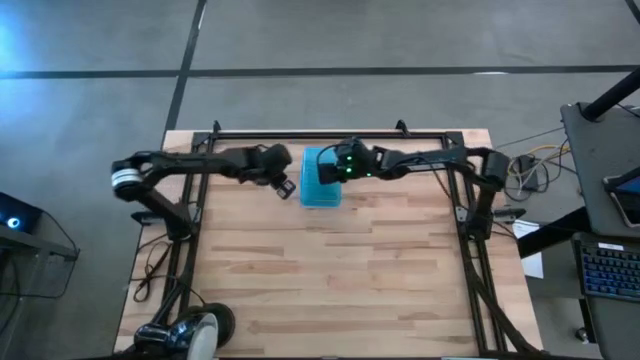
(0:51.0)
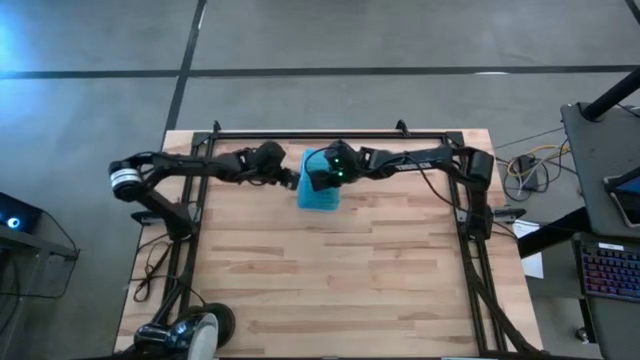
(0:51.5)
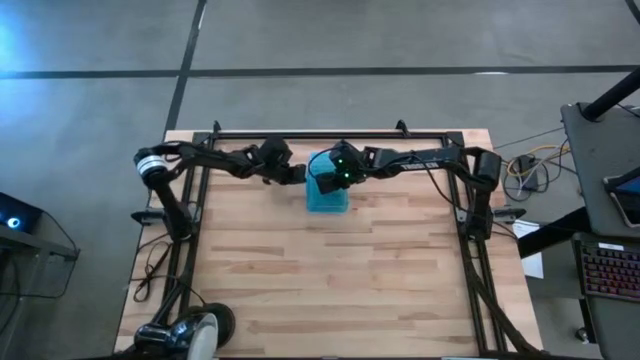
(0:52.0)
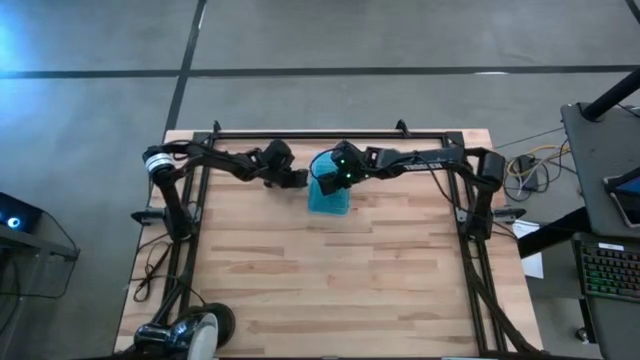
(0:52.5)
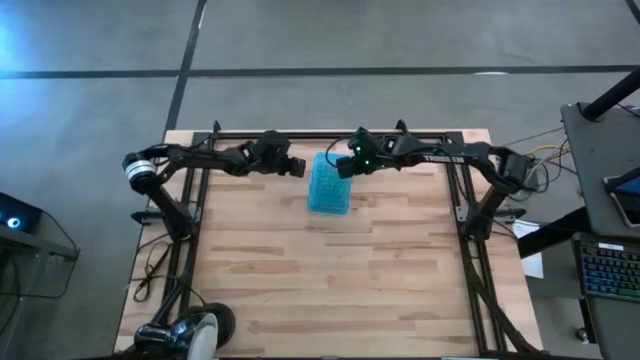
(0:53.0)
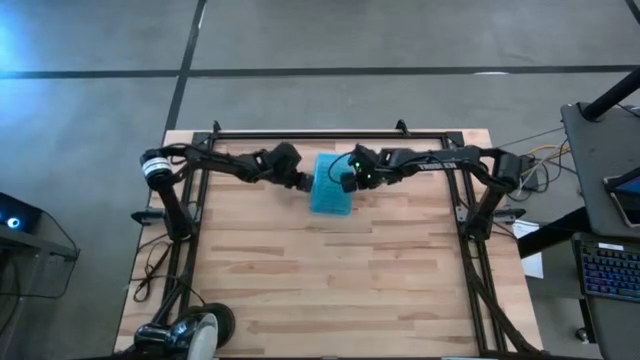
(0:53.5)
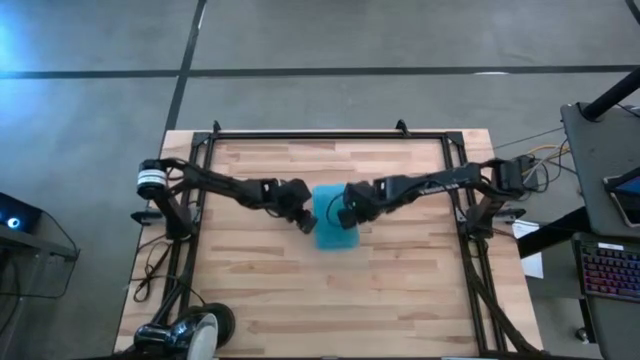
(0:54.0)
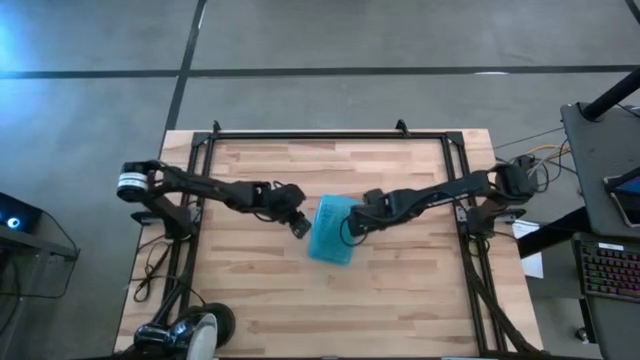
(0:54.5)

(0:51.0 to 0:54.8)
Task: Pick & place school supplies into a supply box
Move the supply box to the center of the table

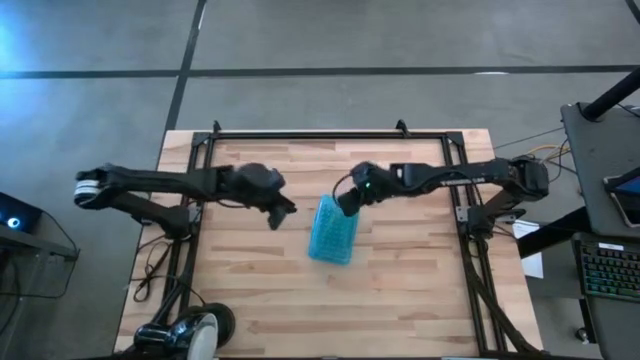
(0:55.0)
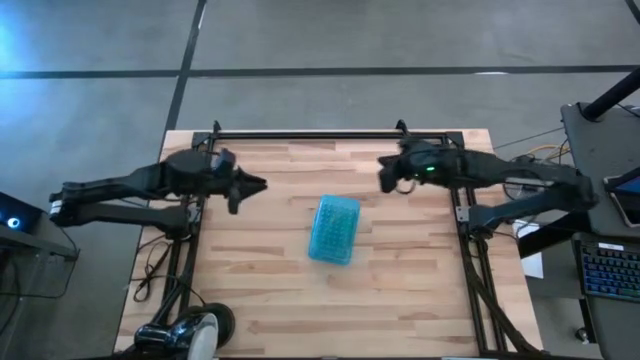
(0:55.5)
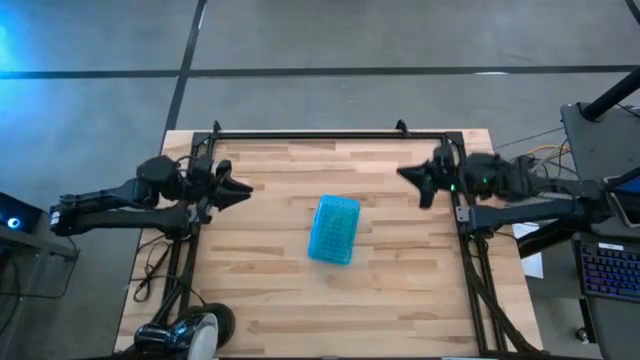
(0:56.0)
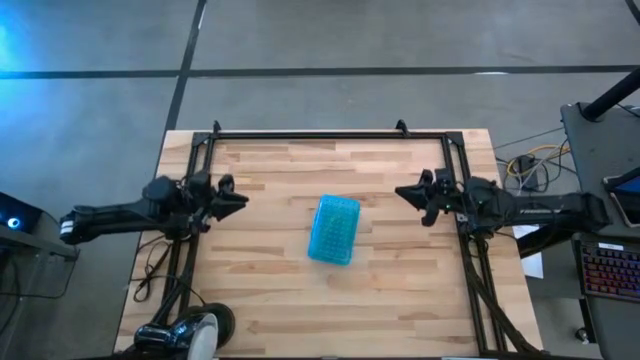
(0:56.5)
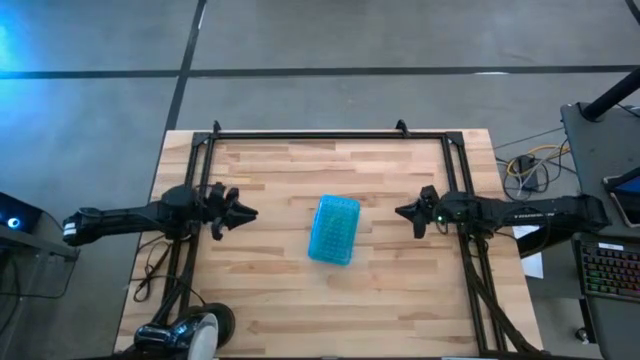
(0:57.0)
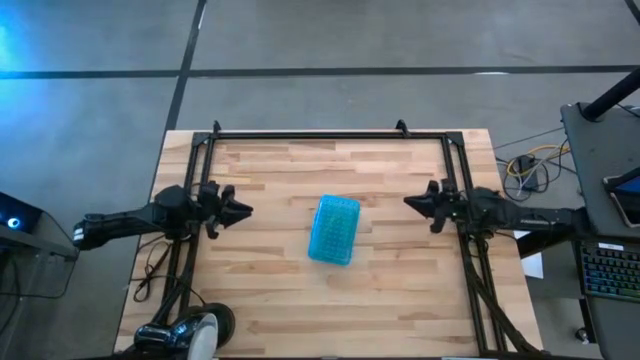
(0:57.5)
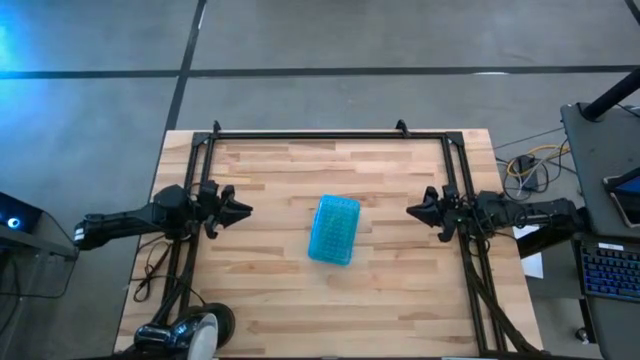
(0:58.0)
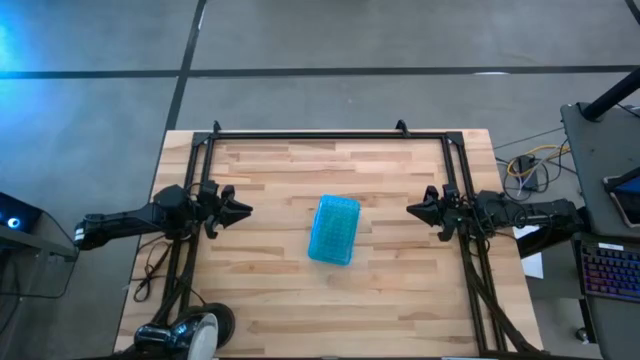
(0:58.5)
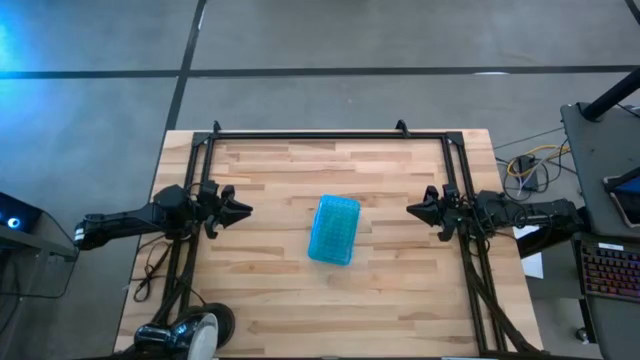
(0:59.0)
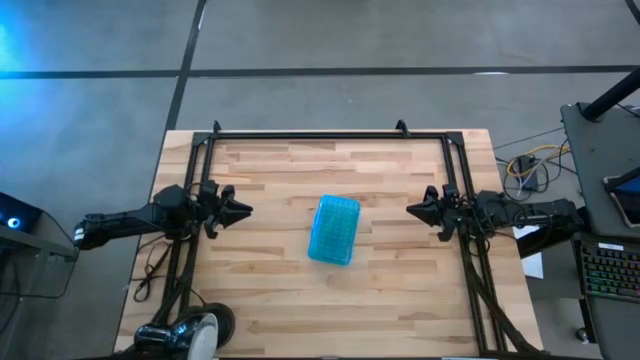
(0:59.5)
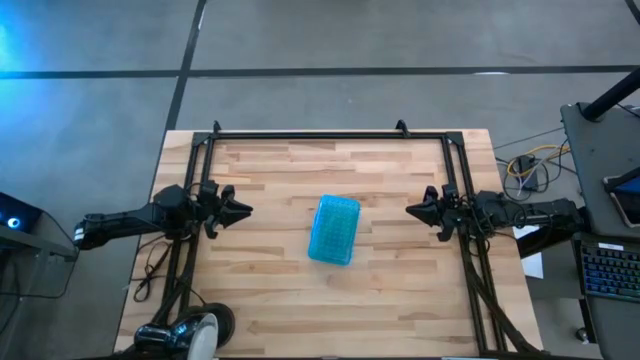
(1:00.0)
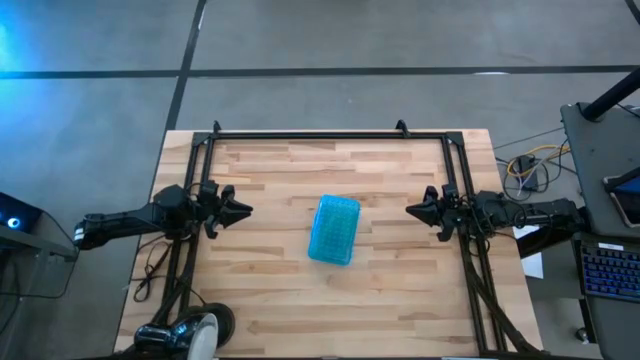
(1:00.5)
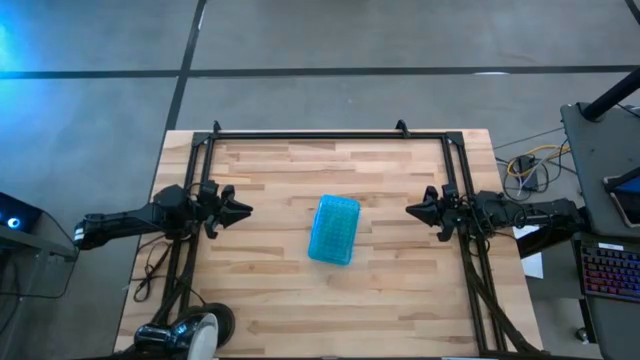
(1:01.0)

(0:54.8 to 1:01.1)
Return to Home Position

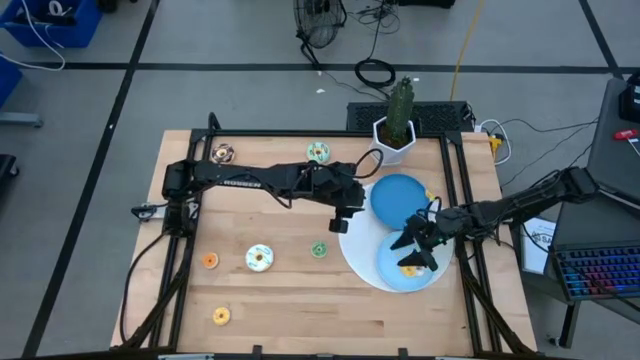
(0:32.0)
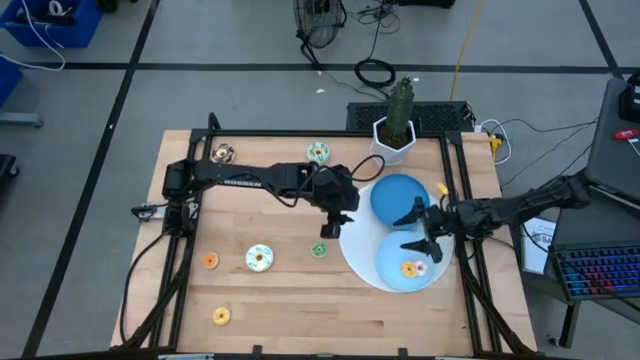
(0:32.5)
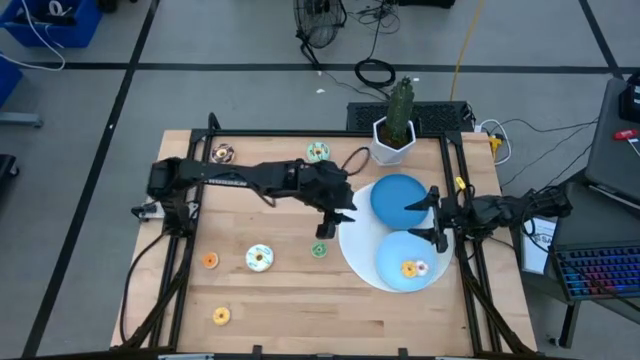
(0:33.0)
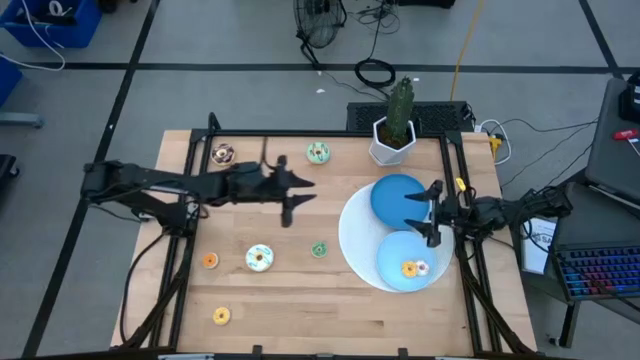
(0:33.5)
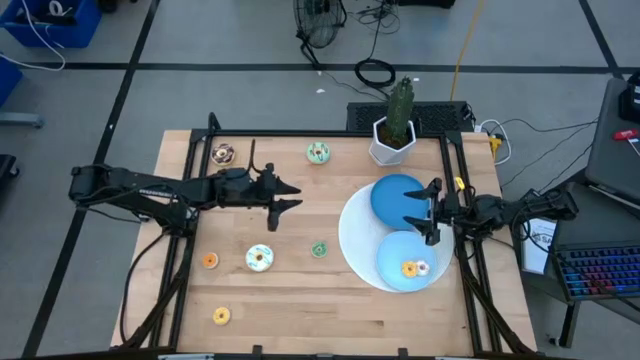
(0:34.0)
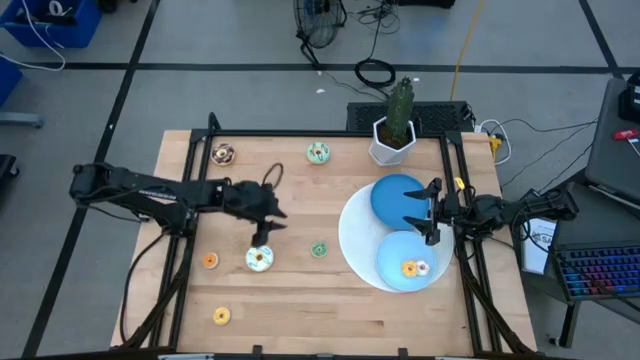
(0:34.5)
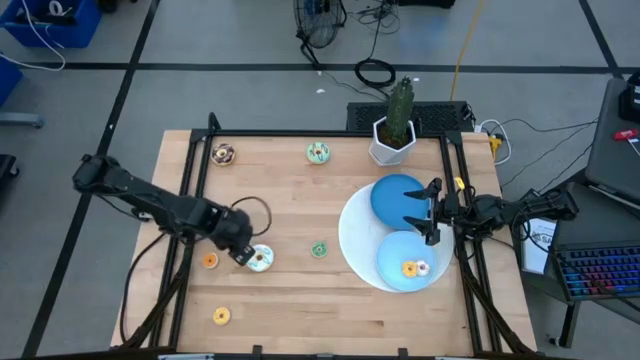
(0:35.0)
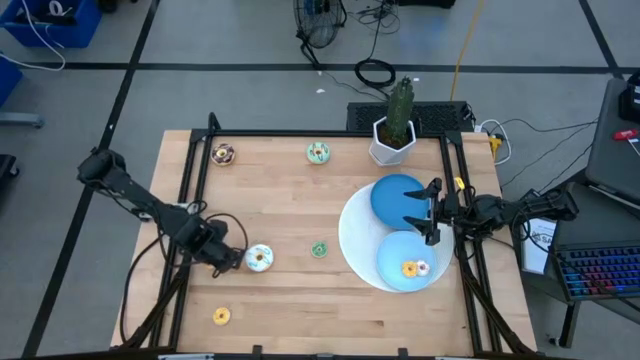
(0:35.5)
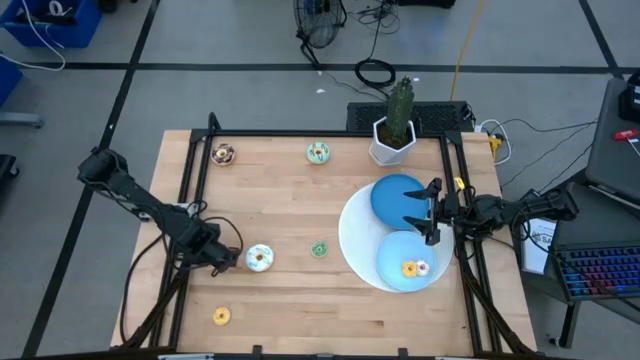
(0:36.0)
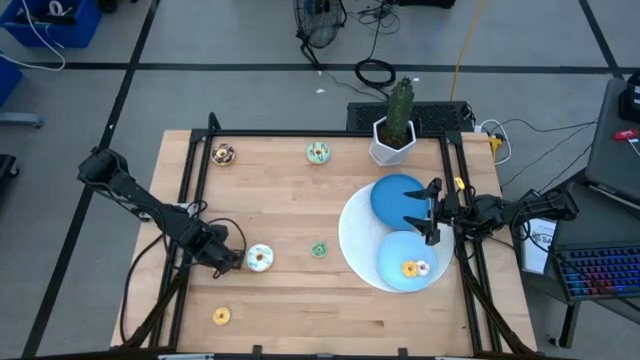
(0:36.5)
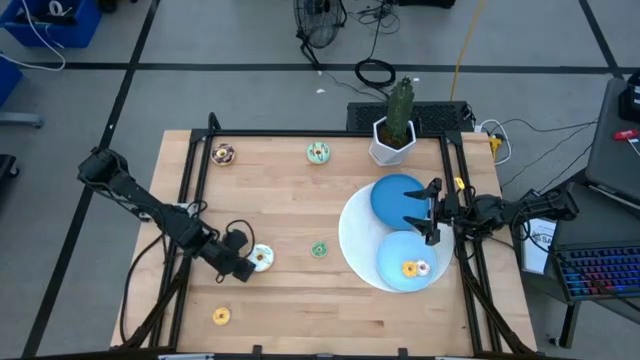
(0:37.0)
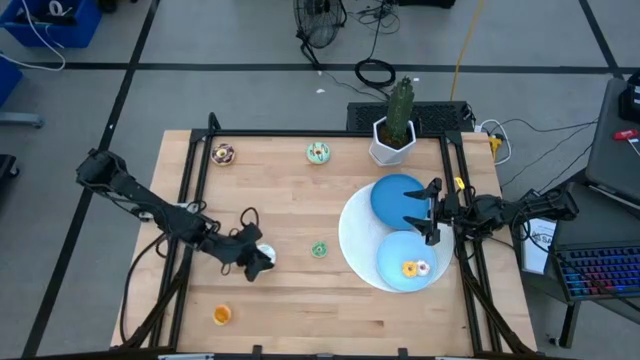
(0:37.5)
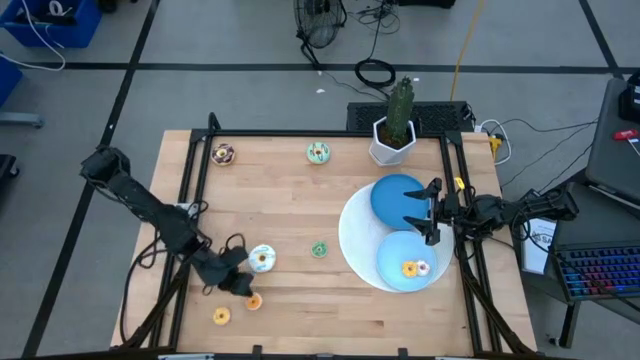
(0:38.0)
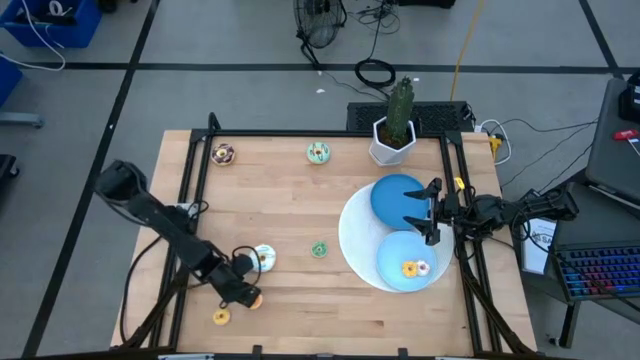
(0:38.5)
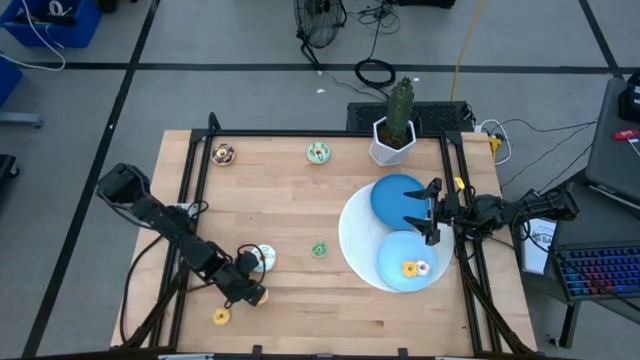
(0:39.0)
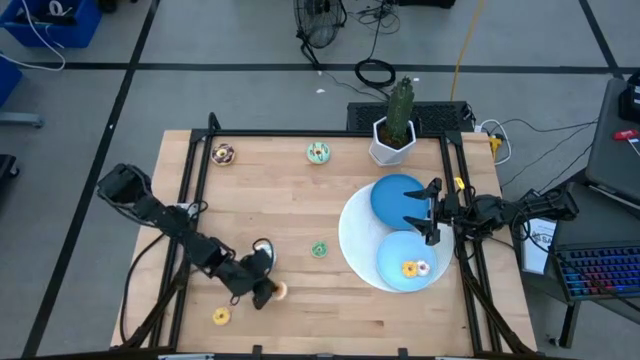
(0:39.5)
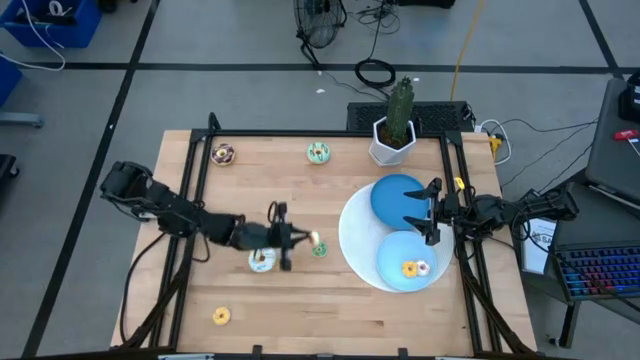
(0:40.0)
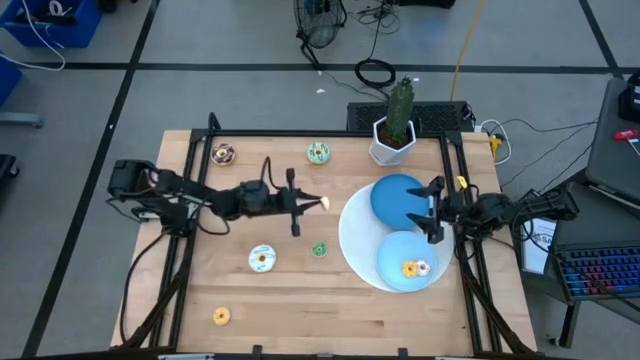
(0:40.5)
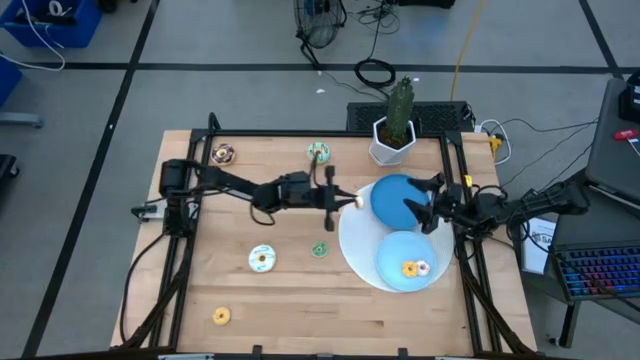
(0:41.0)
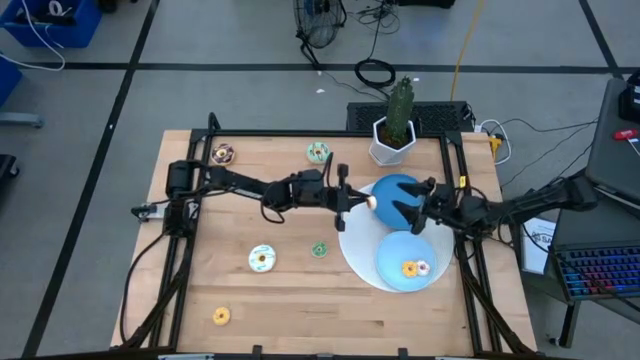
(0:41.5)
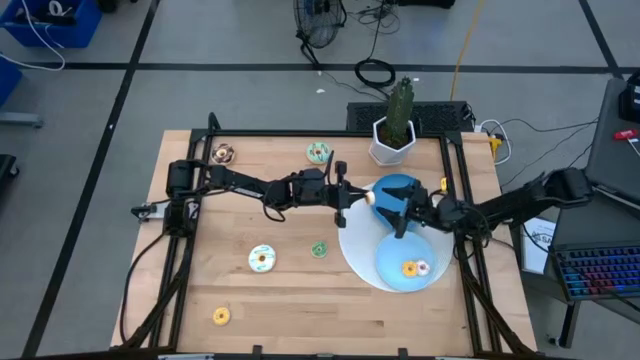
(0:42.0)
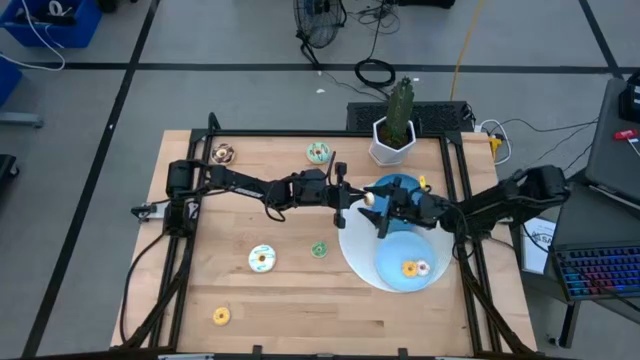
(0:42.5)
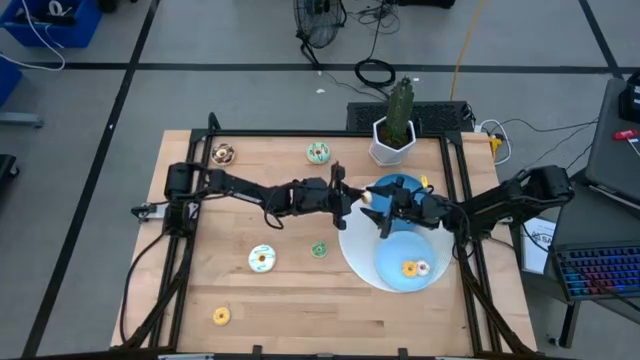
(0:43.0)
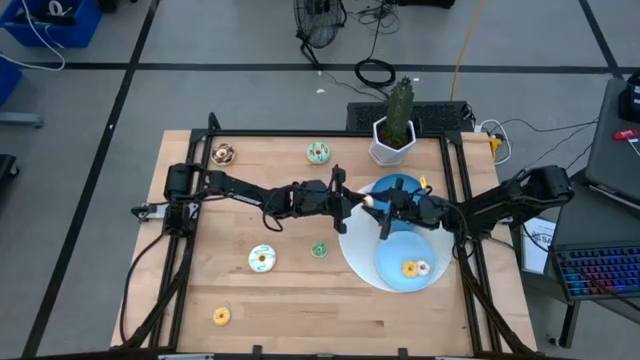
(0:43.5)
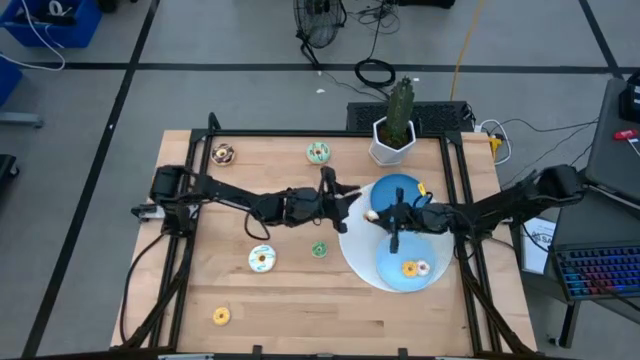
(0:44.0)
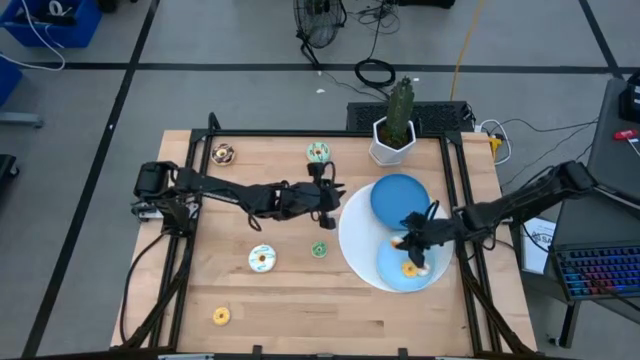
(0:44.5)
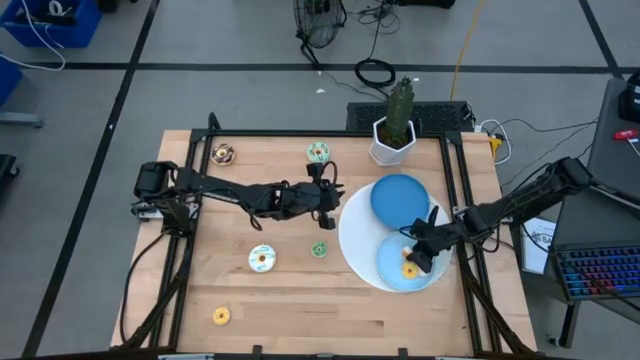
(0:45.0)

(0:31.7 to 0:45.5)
Task: Pick & Place donuts
Put the small orange donut on the light blue plate
